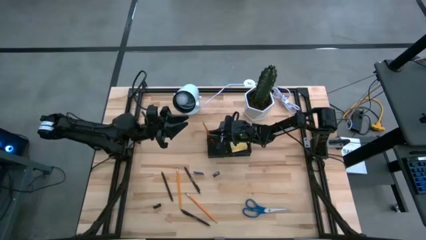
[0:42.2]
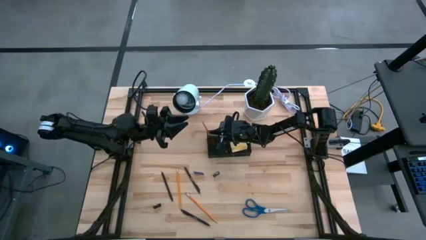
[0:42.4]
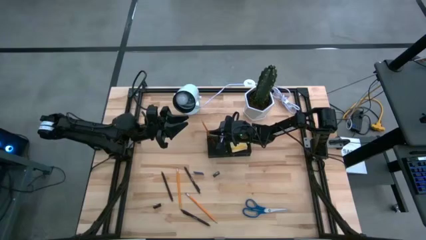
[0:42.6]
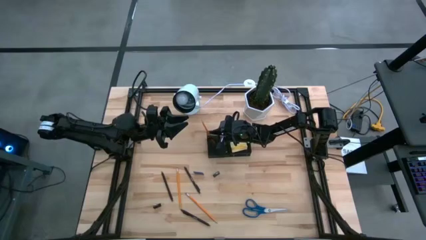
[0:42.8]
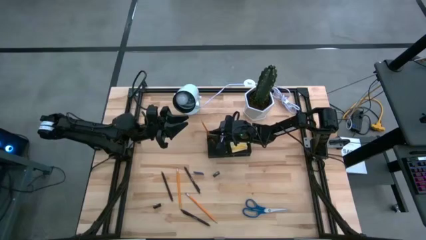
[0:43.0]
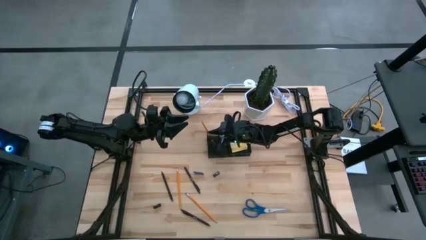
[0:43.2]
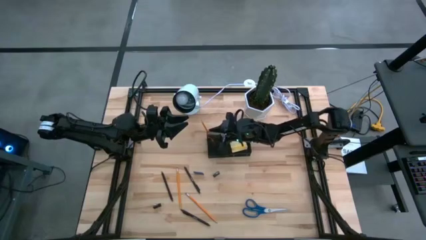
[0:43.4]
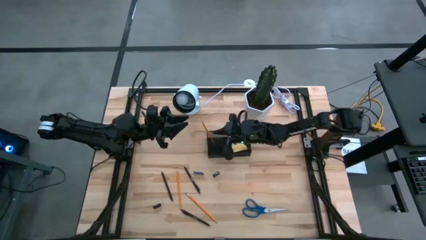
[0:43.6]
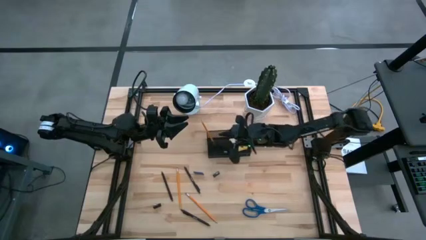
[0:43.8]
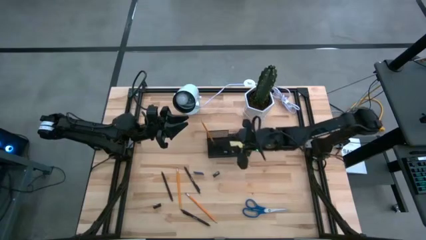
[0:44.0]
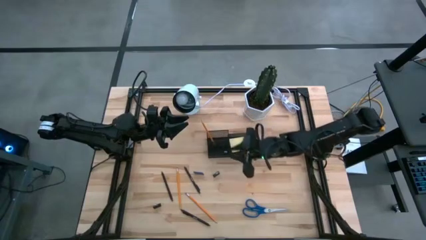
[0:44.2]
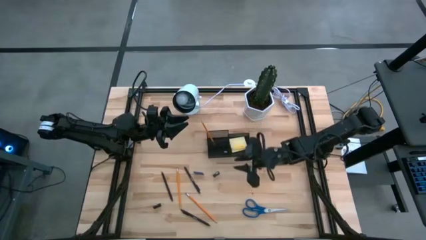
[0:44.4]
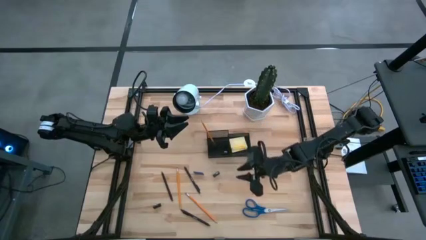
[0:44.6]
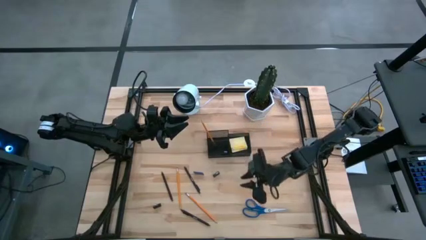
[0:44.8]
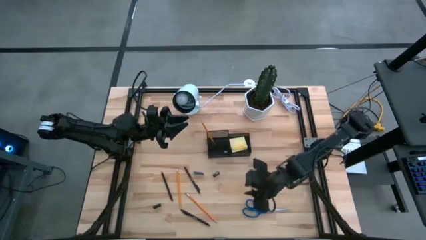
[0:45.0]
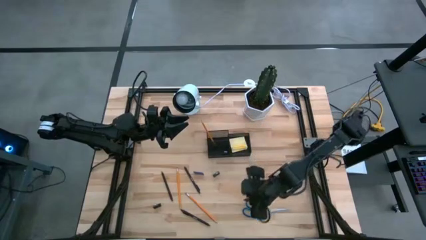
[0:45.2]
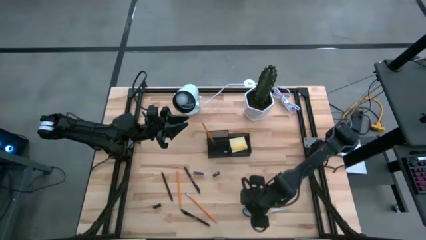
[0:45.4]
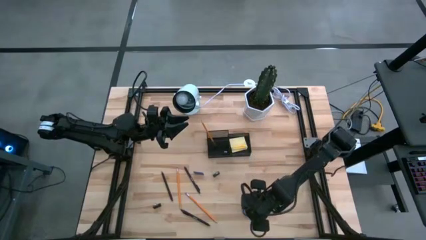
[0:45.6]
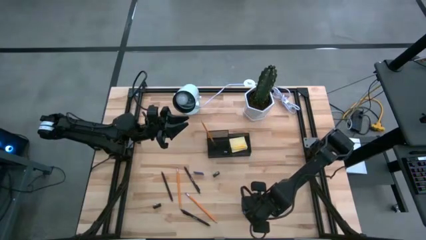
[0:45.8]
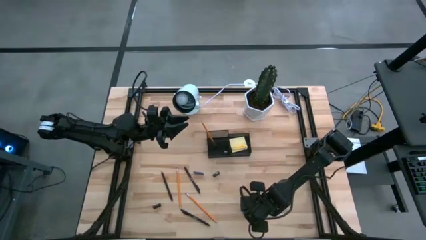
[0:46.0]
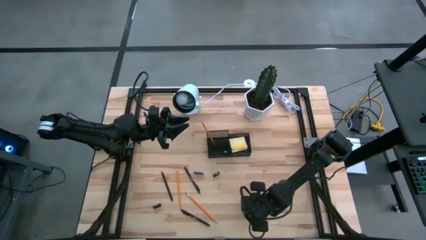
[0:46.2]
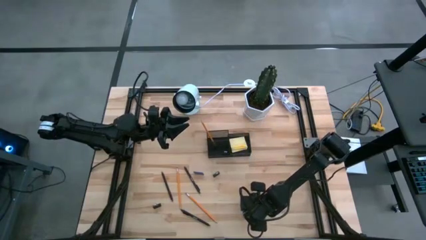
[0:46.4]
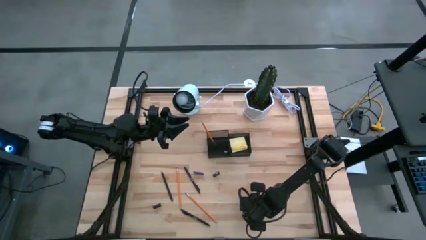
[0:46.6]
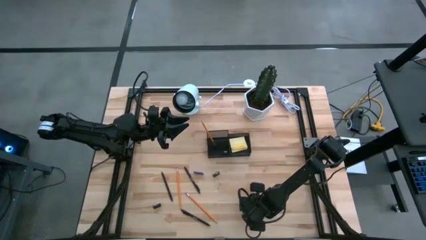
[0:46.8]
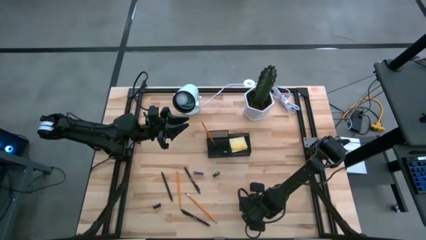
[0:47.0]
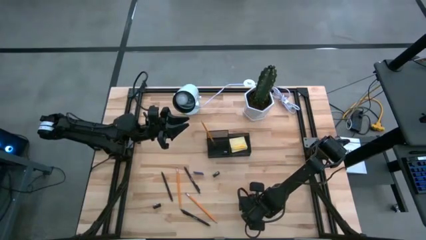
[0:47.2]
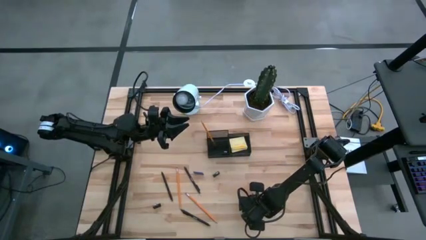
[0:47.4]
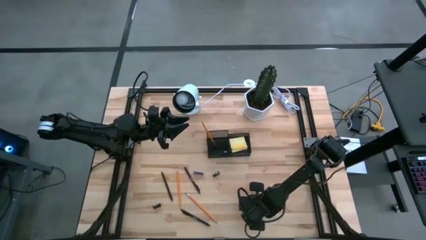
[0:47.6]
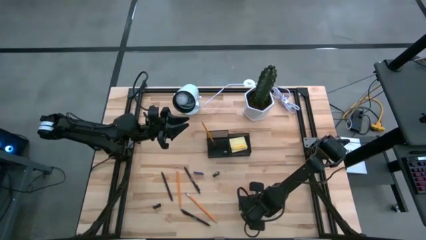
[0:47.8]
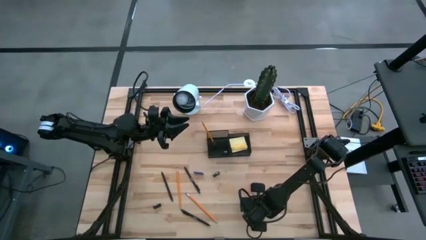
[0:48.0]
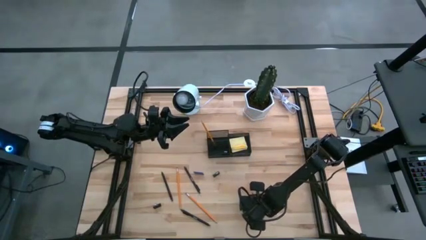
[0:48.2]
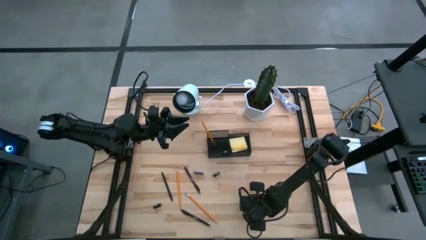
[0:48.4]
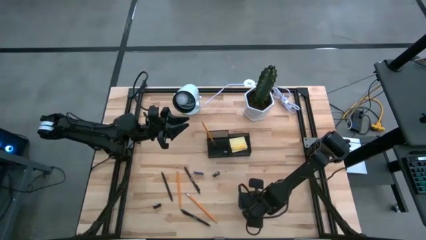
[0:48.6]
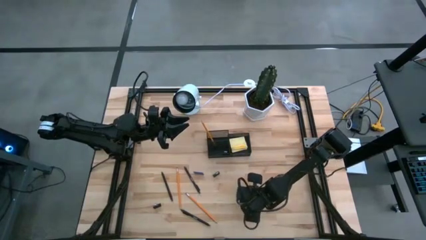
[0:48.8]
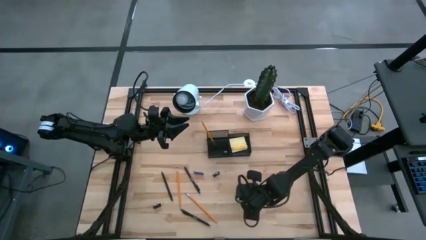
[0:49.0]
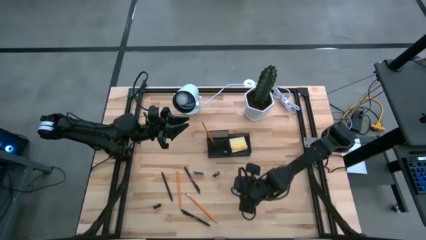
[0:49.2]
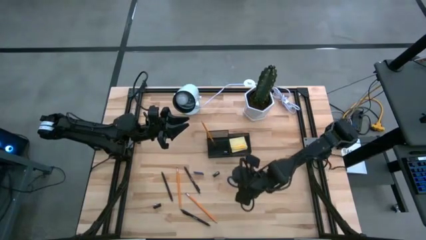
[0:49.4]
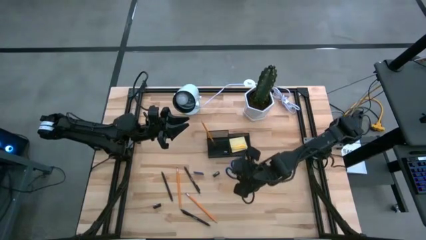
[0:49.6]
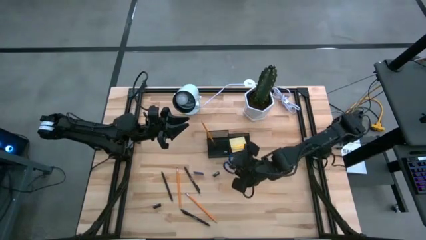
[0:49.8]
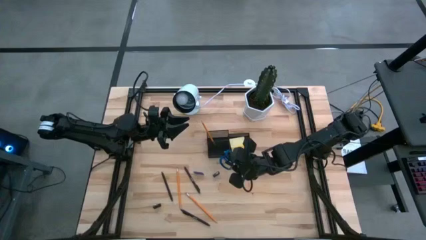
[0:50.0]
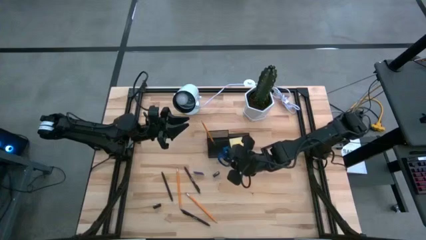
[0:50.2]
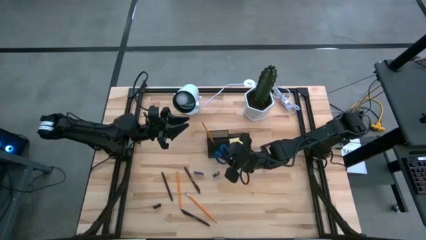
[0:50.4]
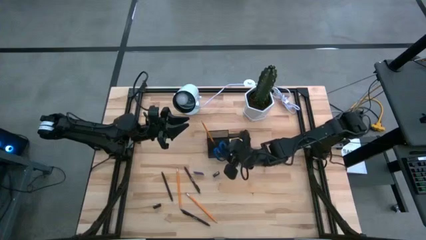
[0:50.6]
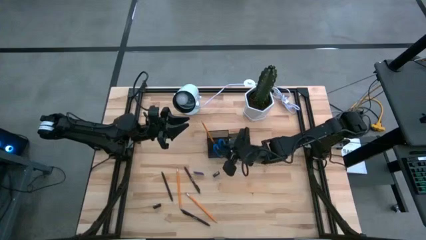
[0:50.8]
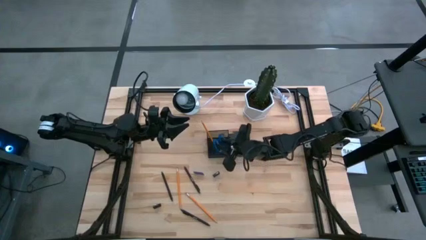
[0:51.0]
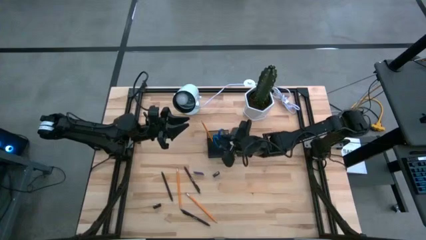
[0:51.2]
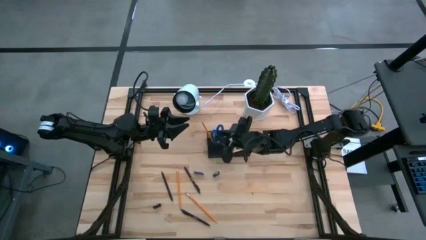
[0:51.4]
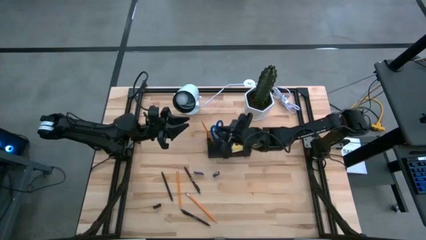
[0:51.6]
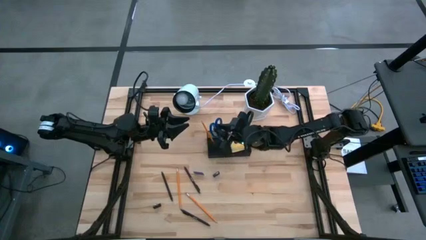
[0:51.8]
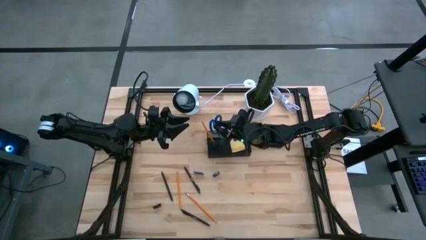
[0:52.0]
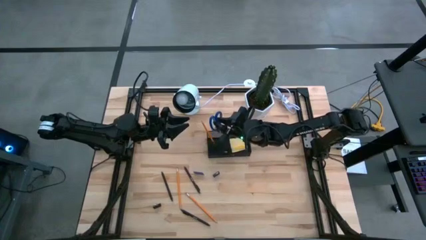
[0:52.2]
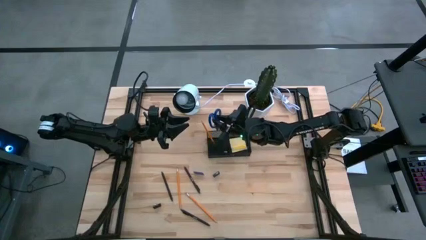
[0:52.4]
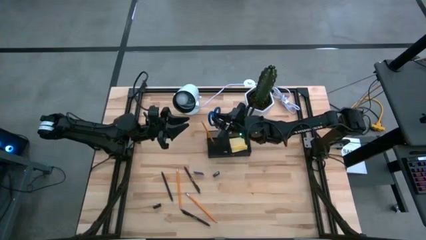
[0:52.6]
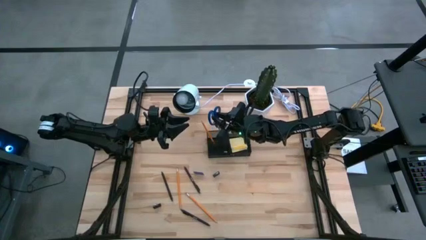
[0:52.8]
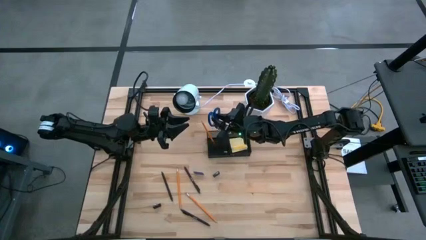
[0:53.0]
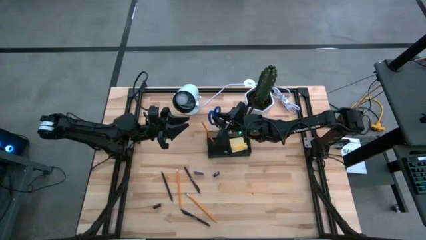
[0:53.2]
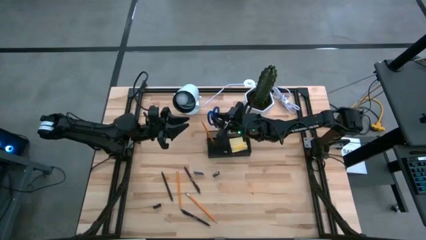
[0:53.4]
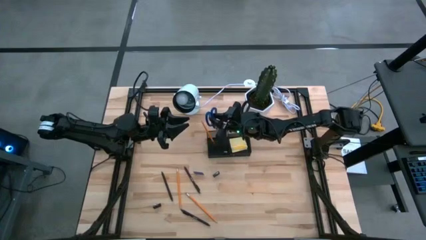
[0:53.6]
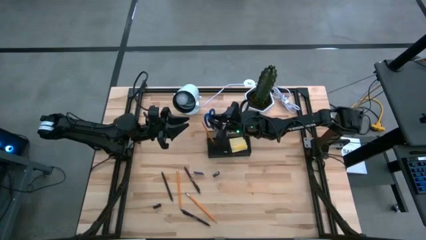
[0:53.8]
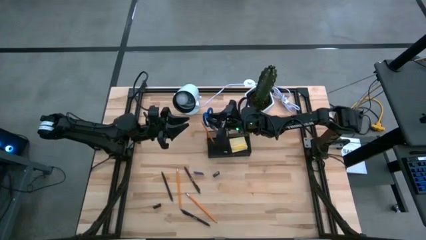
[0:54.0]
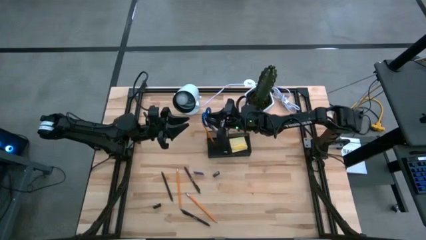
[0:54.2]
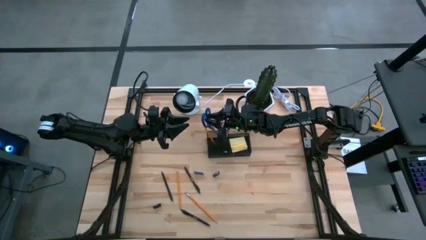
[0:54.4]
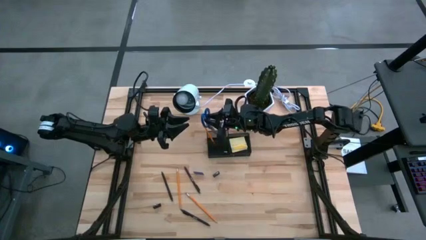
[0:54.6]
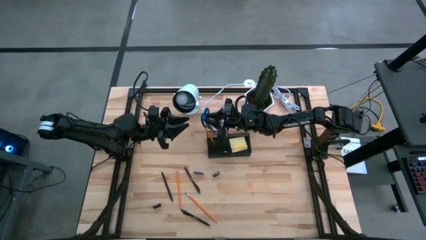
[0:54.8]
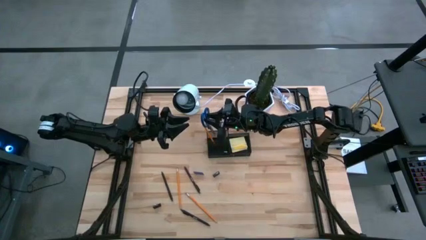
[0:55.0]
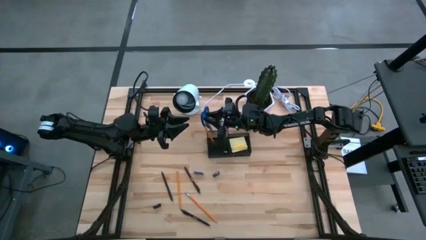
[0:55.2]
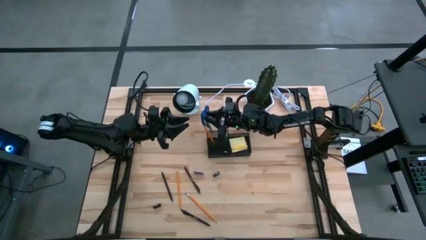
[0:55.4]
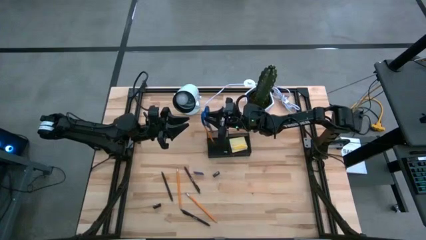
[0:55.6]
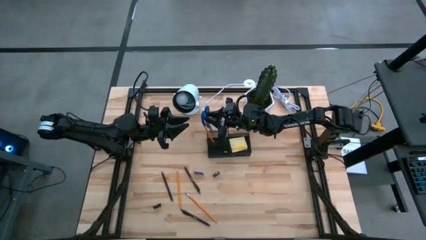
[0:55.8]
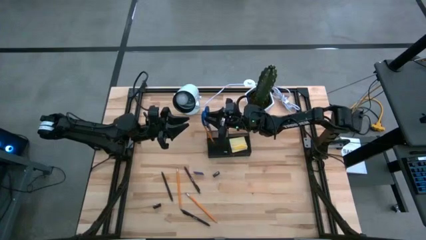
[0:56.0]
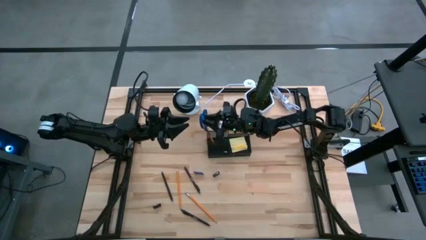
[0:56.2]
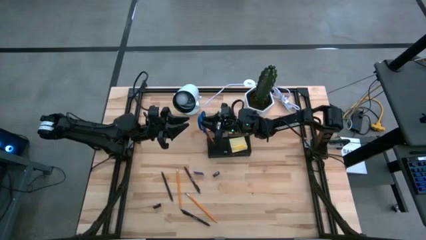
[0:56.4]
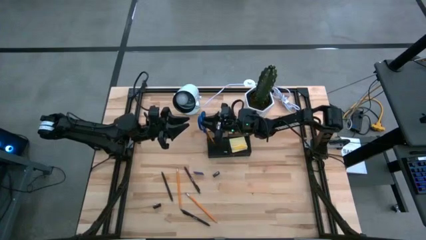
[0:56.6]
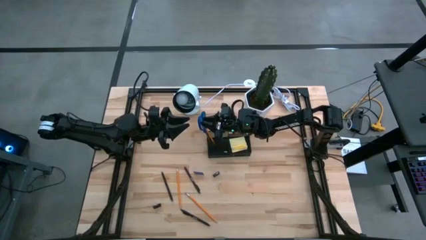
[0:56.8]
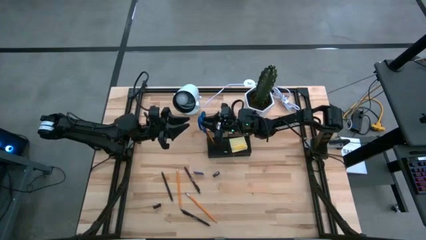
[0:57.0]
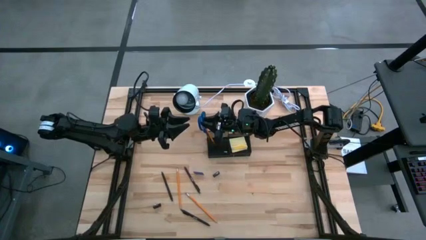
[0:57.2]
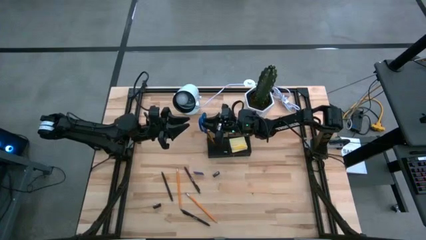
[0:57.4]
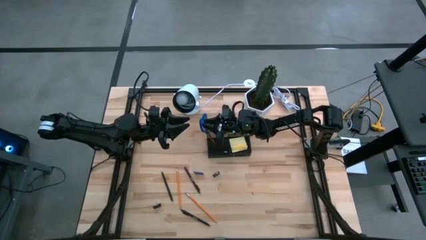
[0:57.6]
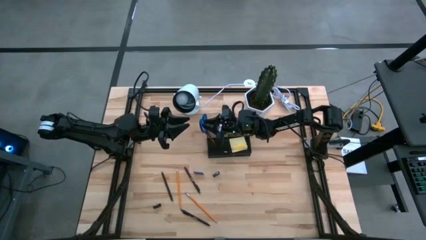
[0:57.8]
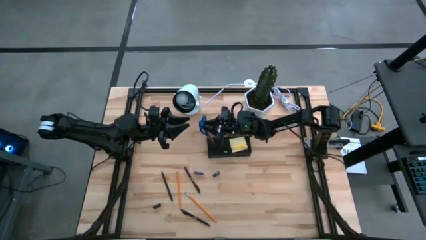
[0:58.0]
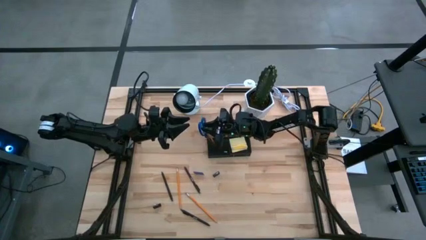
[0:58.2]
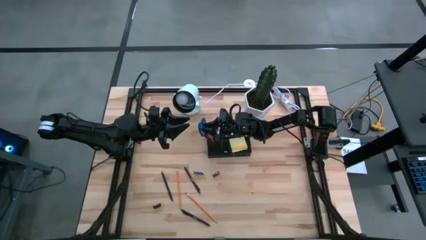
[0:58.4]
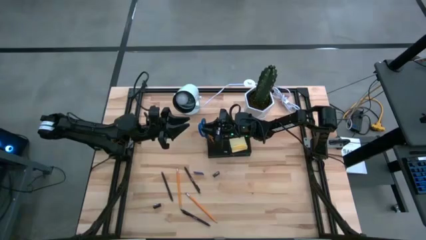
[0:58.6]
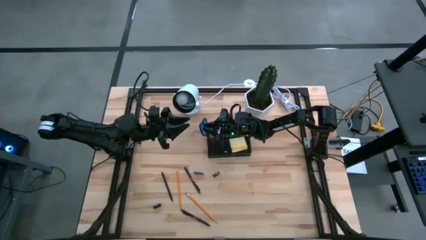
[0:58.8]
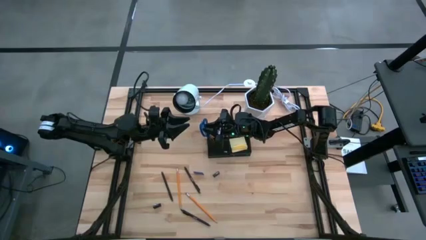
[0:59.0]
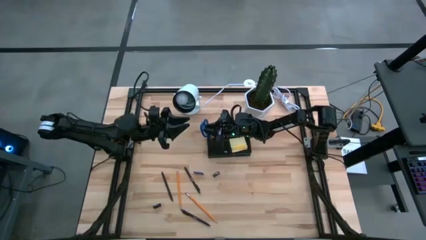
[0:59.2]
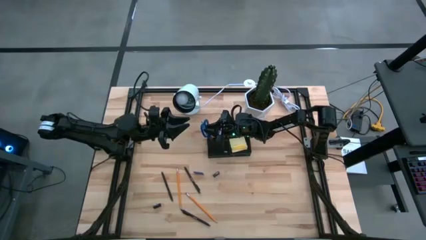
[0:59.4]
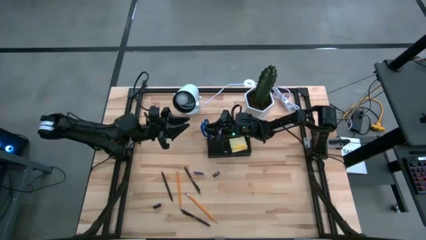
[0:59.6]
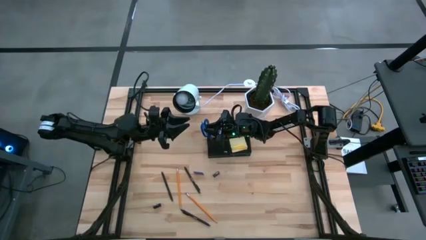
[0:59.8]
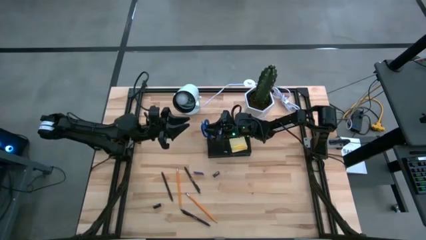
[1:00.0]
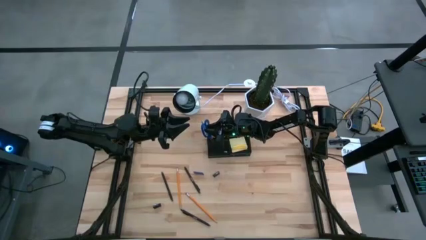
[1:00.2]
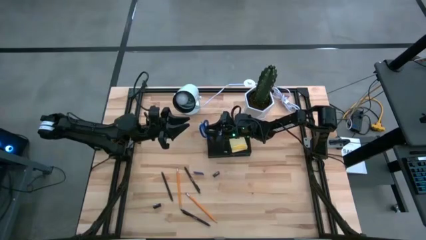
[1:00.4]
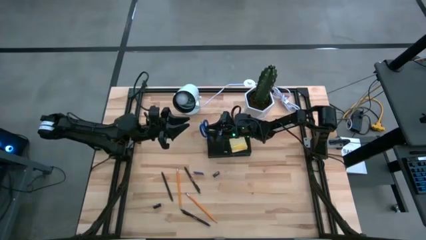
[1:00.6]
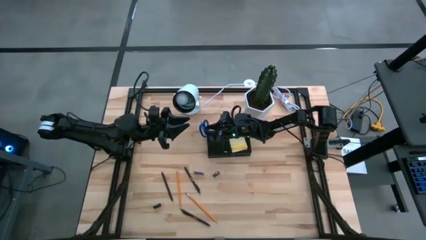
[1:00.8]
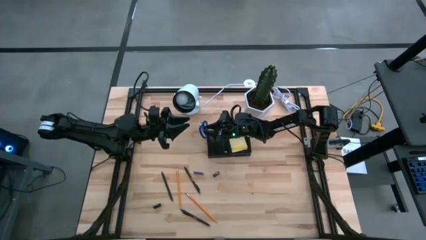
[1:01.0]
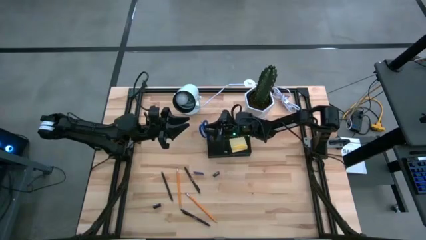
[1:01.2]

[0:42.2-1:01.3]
Task: Pick and place office supplies into organizer
Put the blue scissor into the black desk organizer
